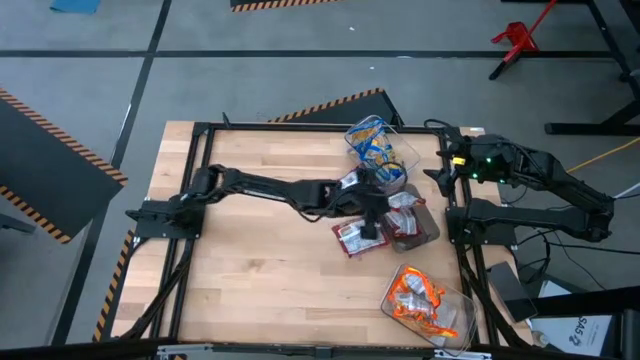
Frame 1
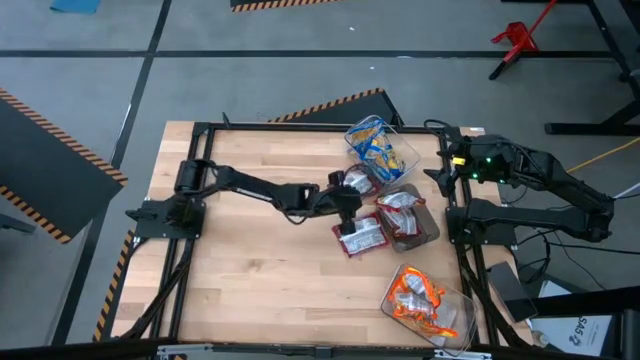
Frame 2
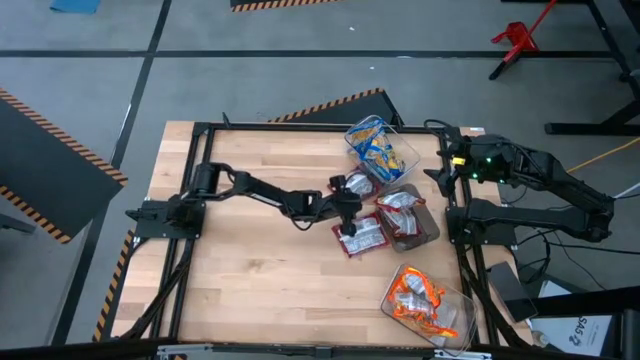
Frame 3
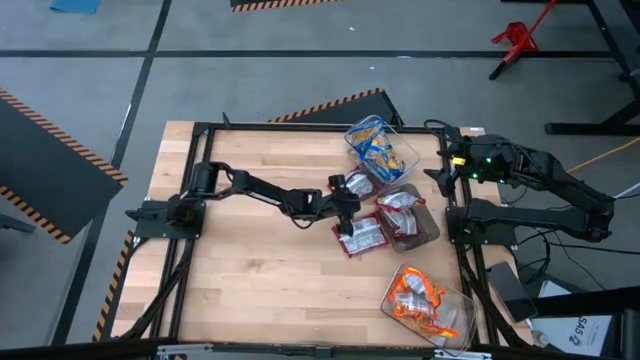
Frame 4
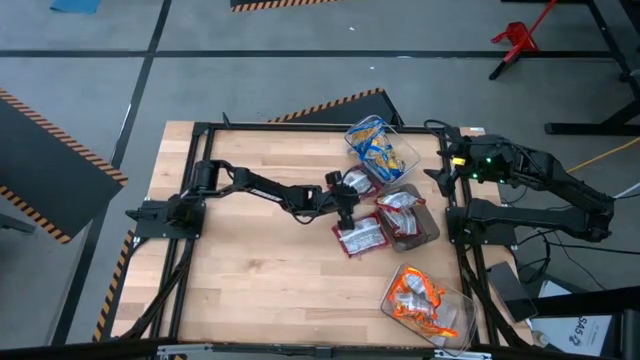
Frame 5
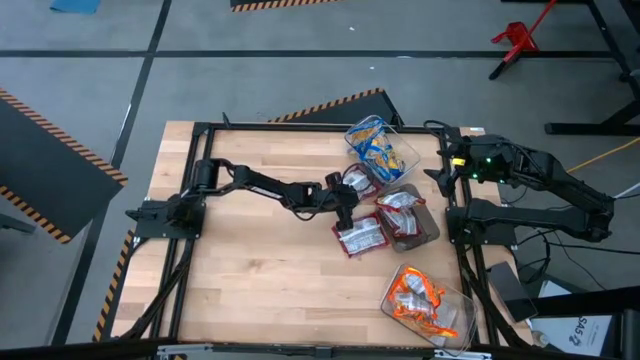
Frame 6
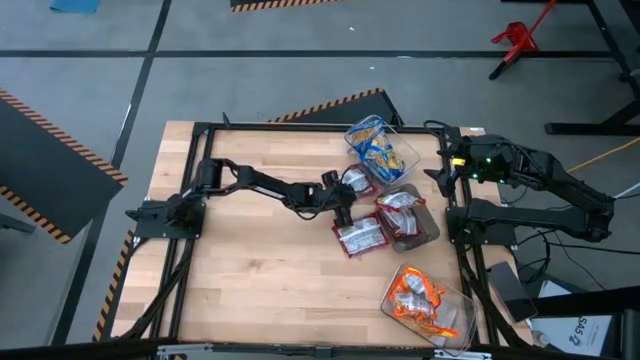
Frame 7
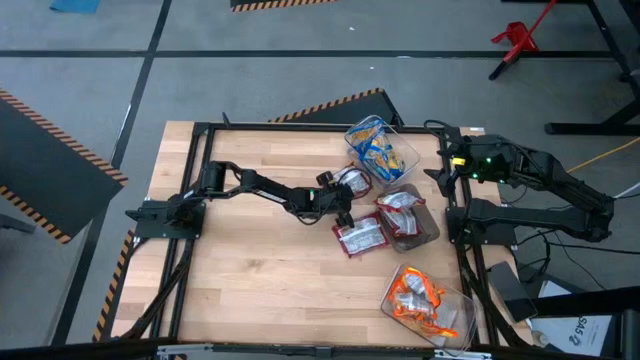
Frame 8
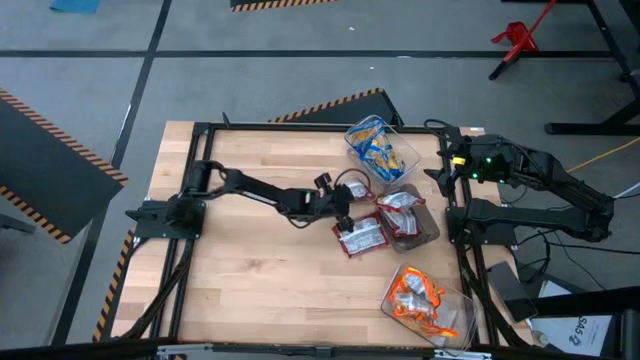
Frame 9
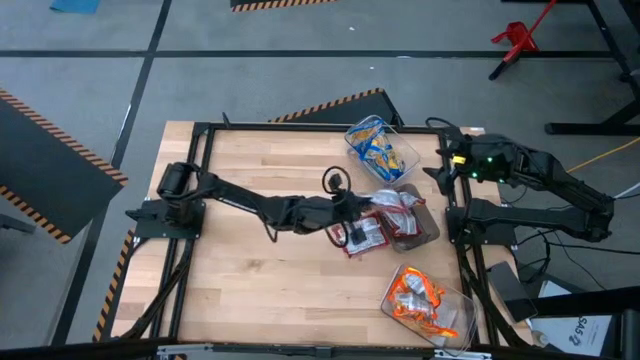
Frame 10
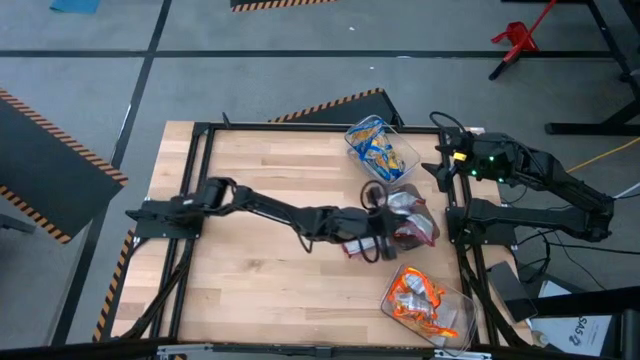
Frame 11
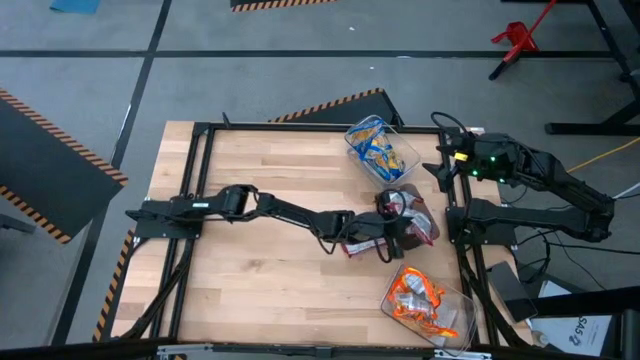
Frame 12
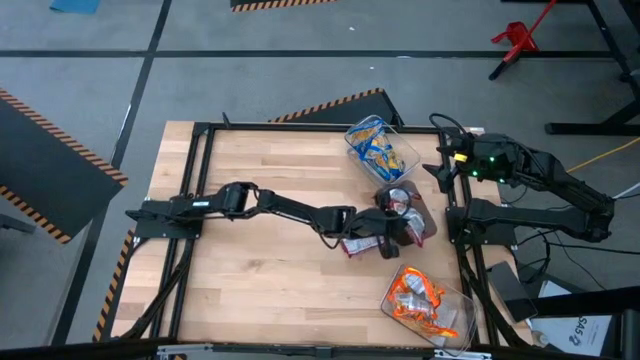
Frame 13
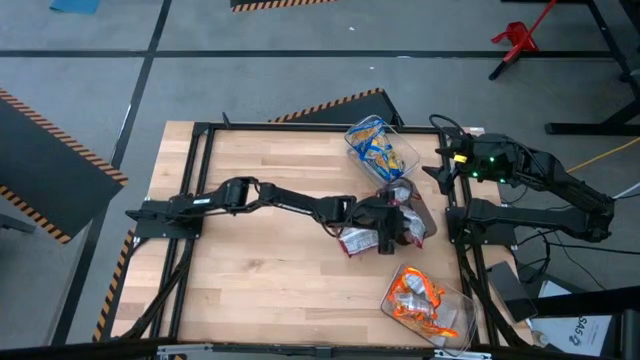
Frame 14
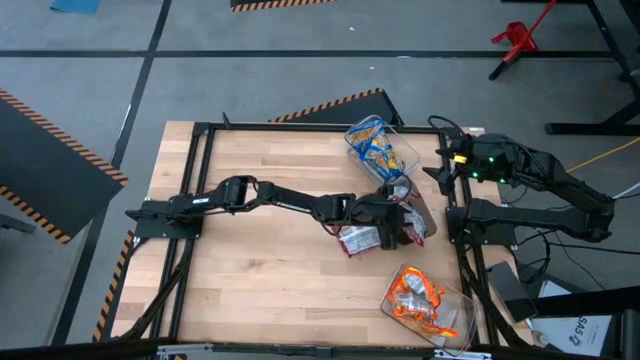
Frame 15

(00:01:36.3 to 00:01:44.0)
Task: Sort Maruchan noodles
Put the red bag into the black bin

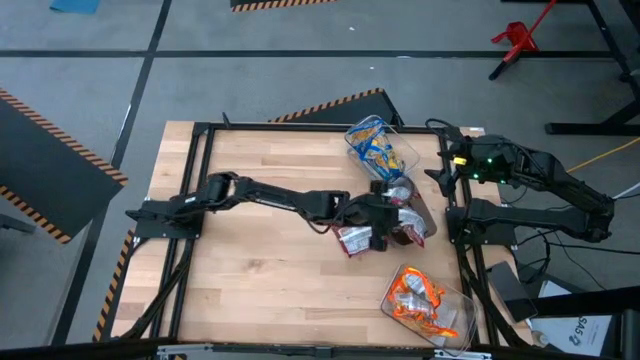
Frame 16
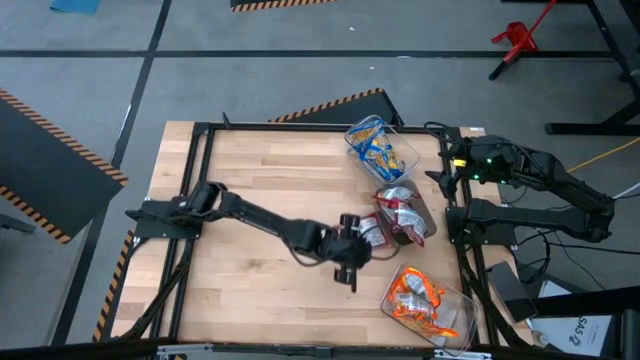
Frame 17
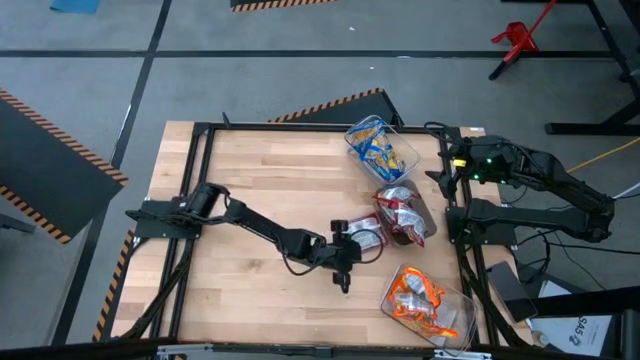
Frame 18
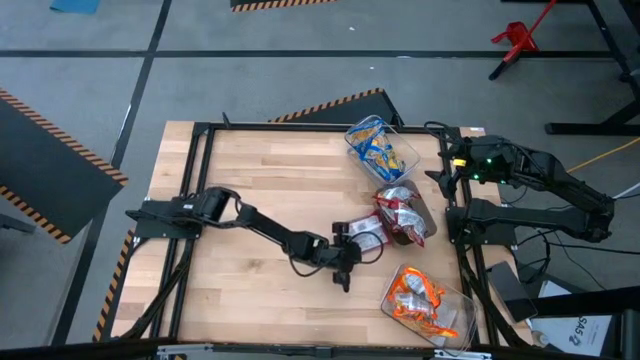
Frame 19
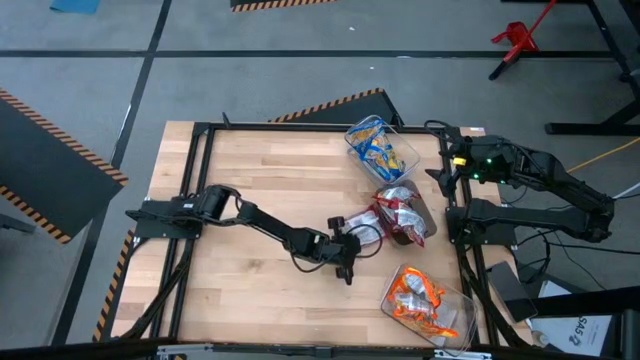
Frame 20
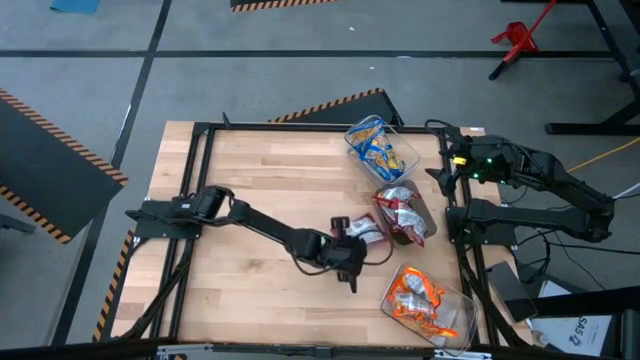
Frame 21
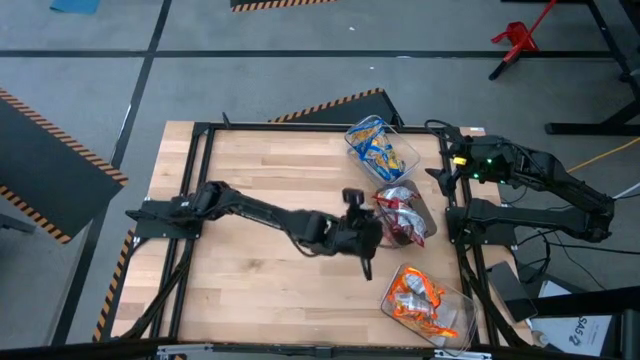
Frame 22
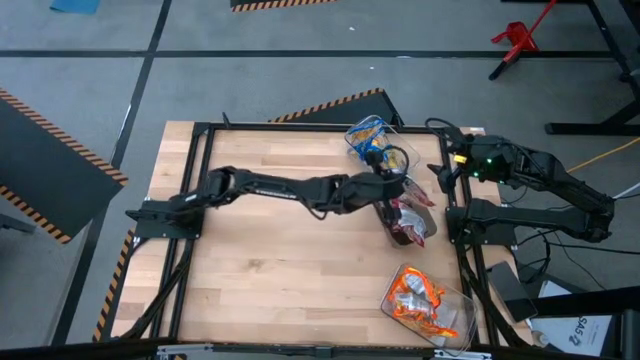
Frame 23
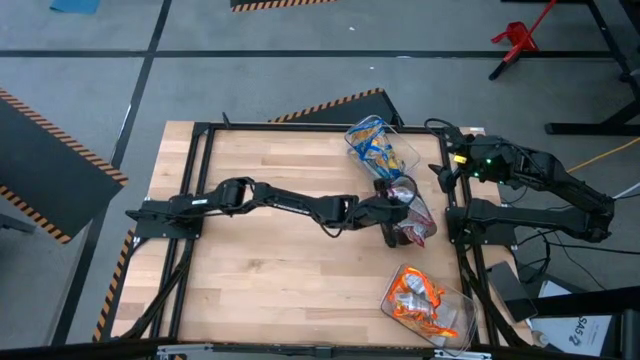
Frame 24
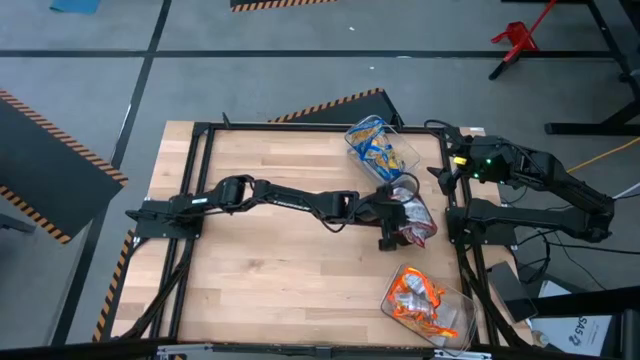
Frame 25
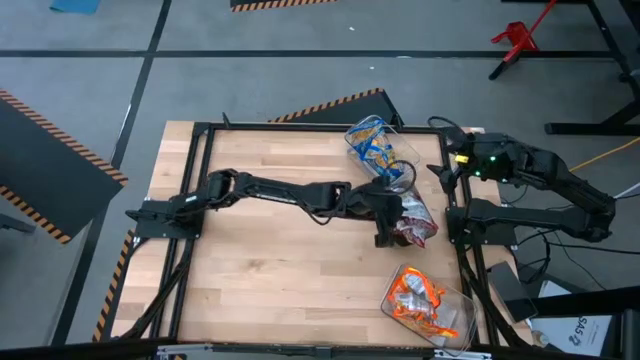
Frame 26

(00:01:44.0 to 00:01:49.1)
Put the red bag into the black bin

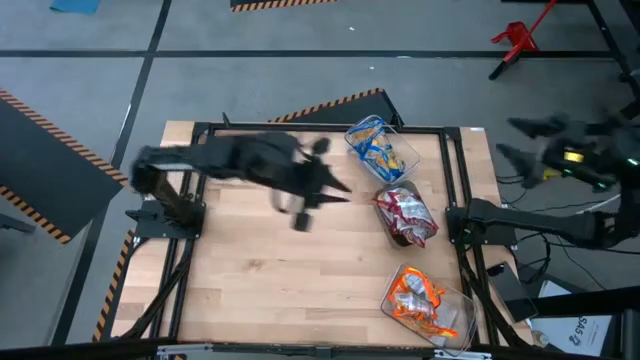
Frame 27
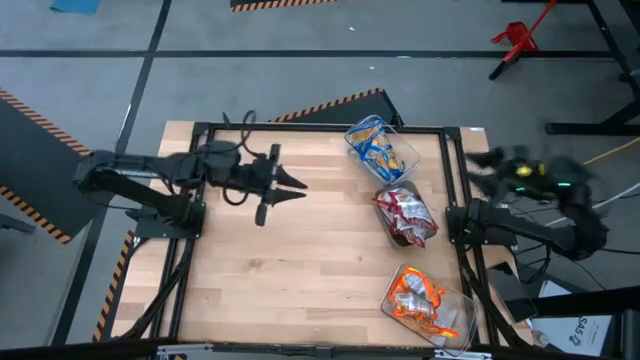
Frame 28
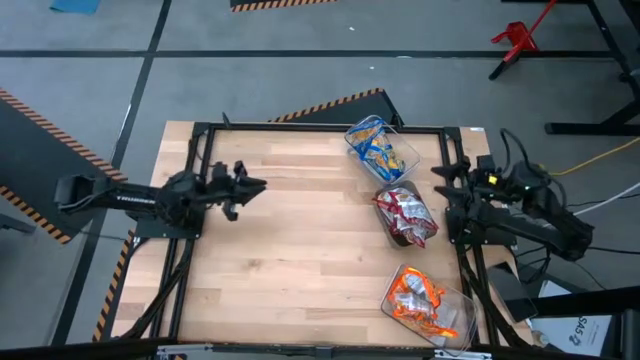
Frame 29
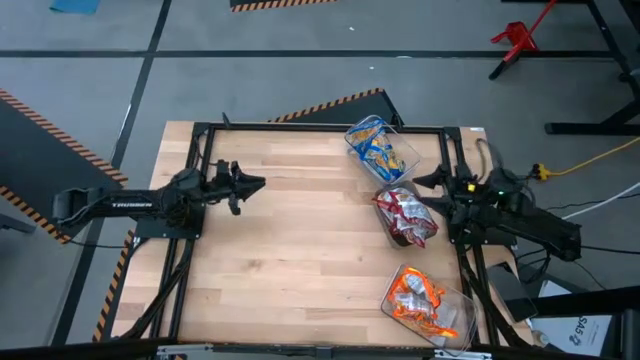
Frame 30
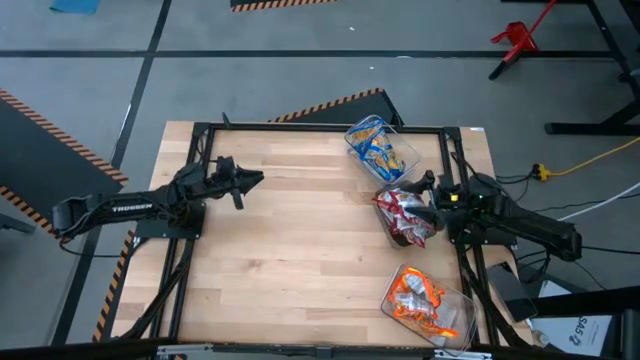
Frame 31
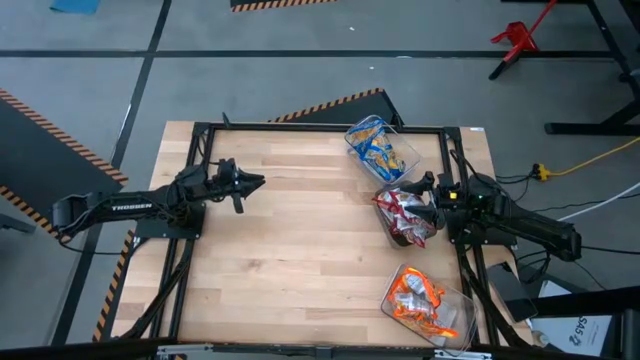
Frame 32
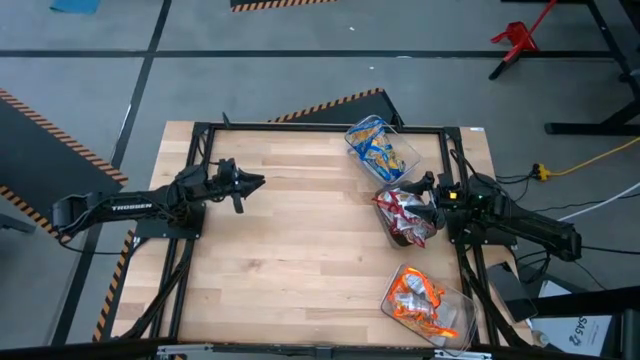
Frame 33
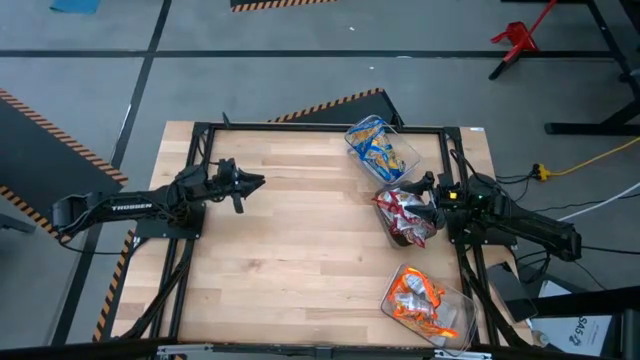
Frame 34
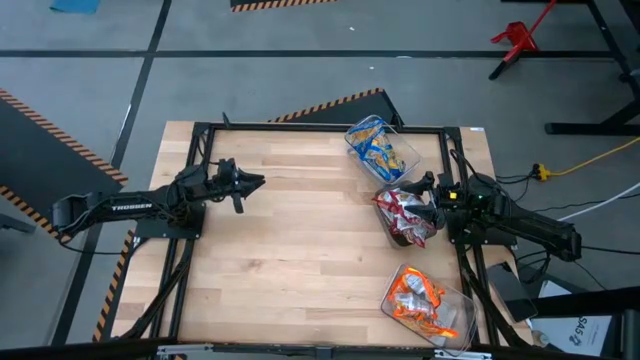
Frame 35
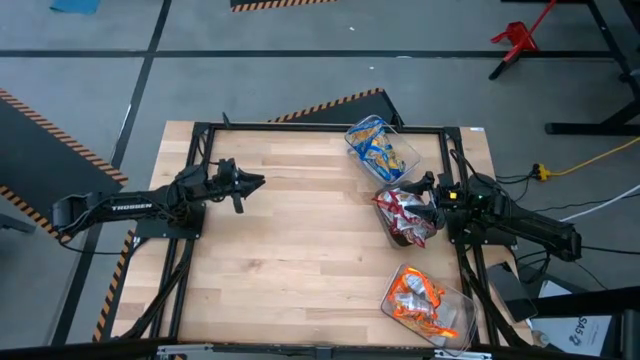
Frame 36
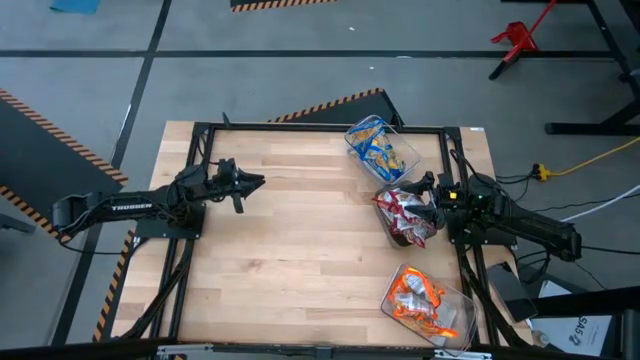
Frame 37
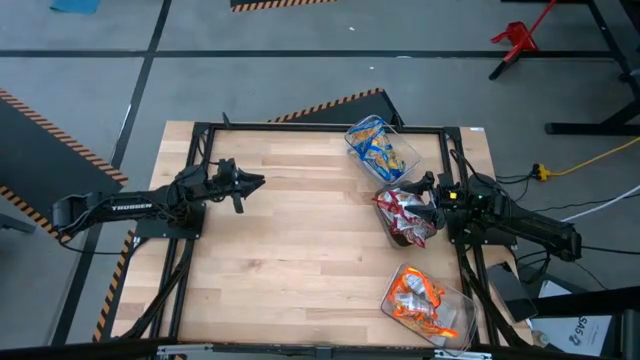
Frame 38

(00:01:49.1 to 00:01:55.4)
Return to Home Position

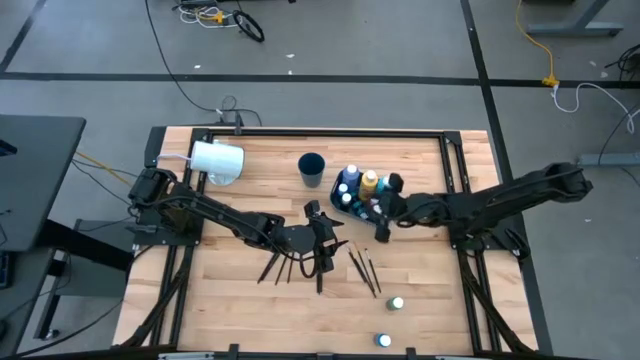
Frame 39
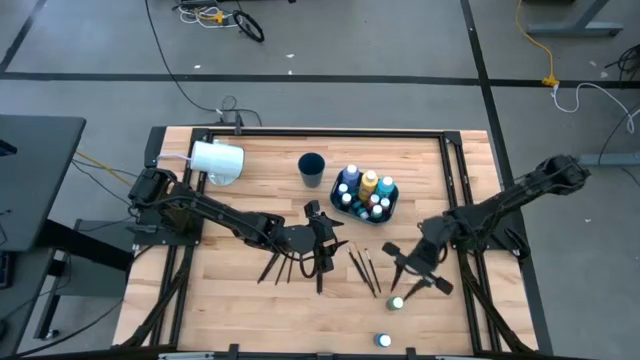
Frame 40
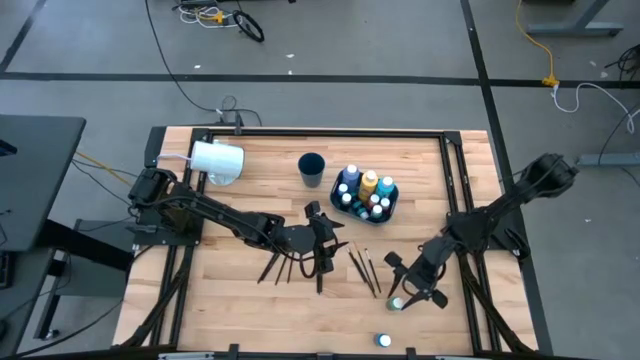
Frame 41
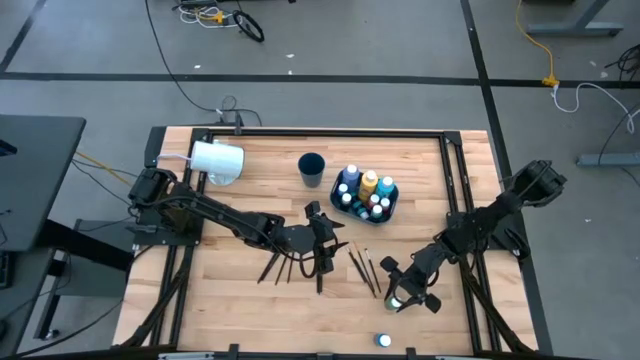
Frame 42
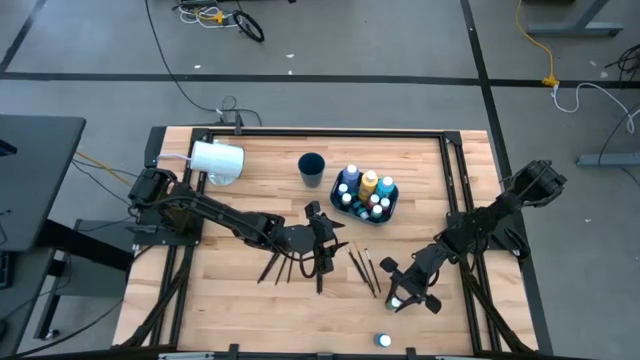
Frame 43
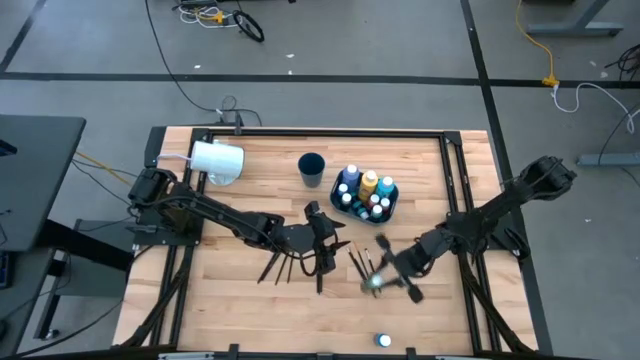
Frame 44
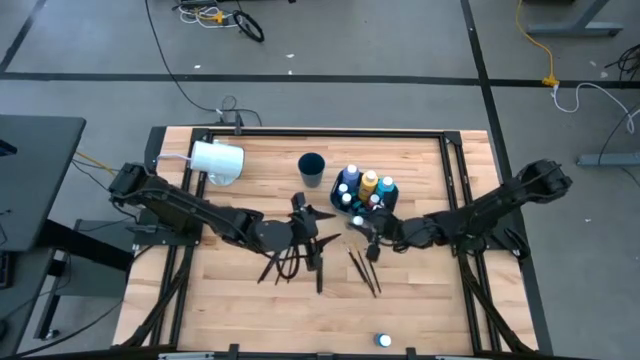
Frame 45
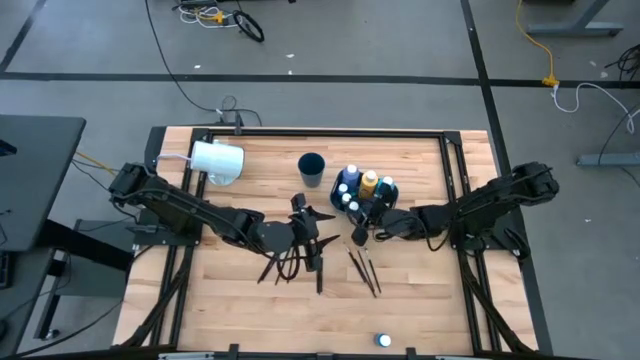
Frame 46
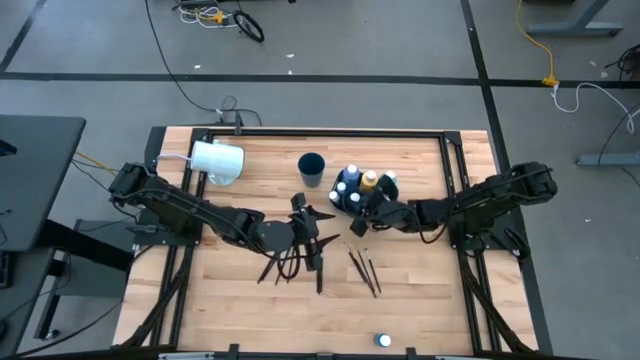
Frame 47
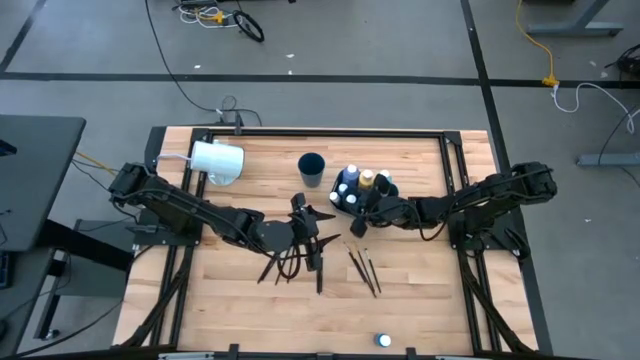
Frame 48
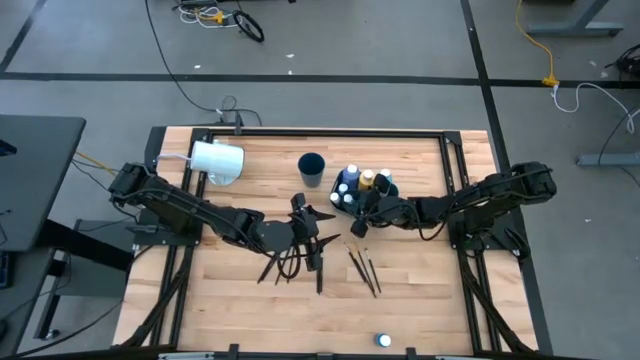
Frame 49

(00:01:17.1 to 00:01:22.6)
Task: Pick & Place Paint Supplies
Put the small green paint bottle into the blue bin
